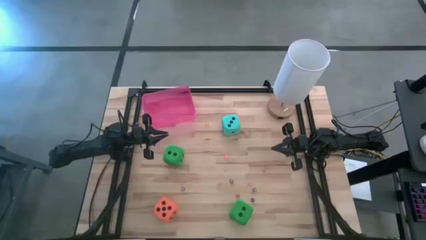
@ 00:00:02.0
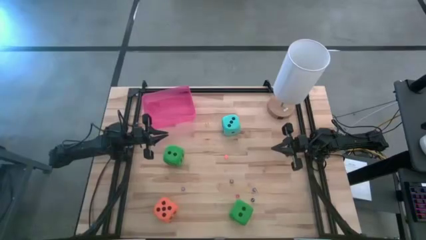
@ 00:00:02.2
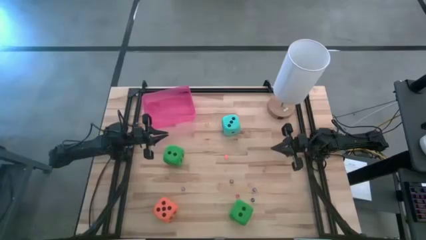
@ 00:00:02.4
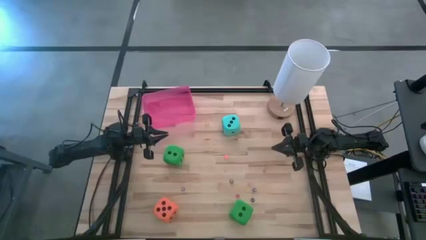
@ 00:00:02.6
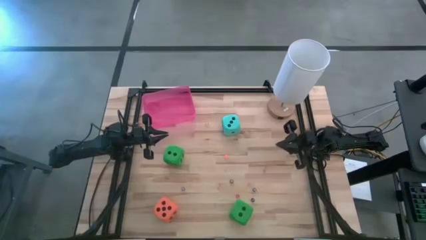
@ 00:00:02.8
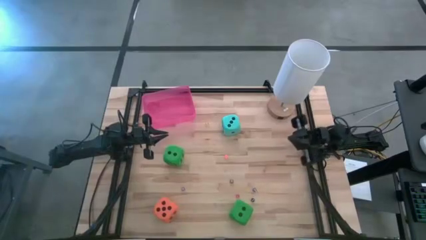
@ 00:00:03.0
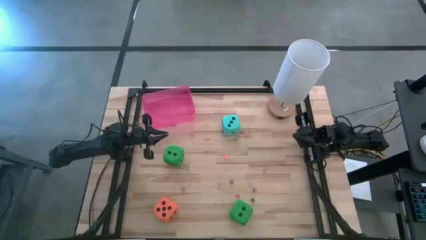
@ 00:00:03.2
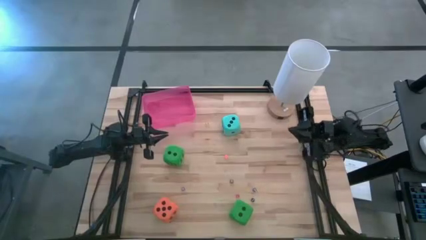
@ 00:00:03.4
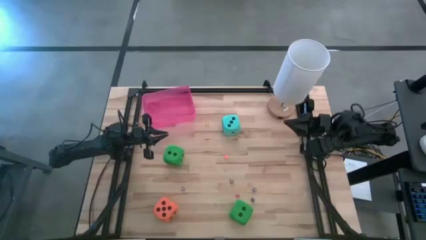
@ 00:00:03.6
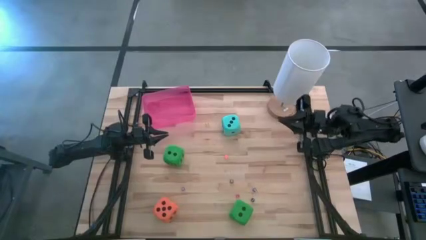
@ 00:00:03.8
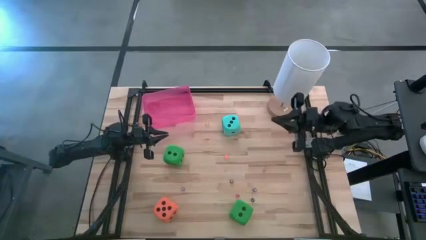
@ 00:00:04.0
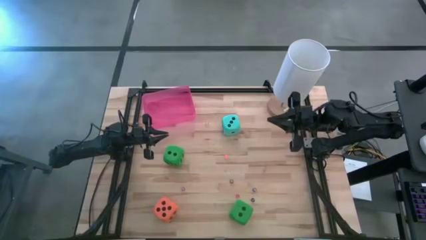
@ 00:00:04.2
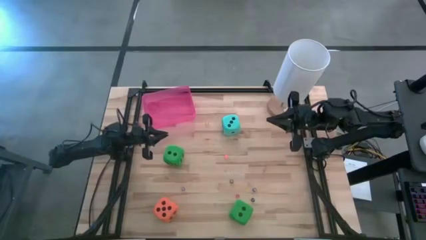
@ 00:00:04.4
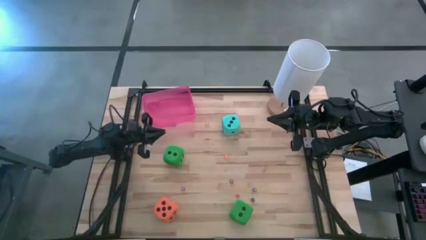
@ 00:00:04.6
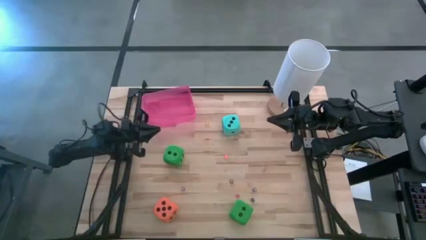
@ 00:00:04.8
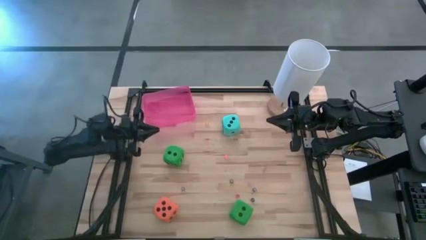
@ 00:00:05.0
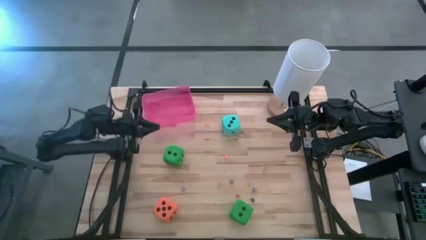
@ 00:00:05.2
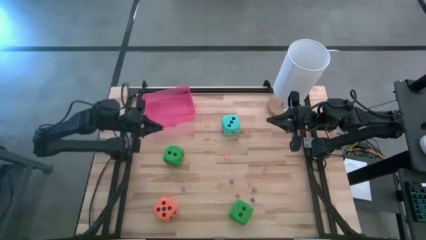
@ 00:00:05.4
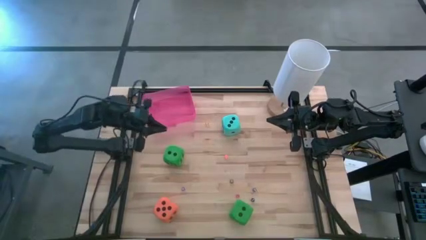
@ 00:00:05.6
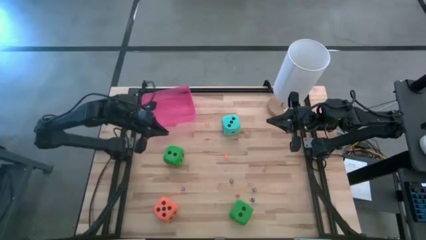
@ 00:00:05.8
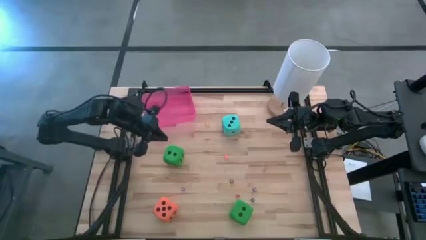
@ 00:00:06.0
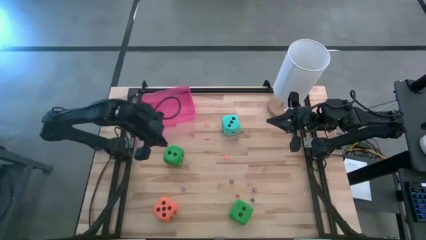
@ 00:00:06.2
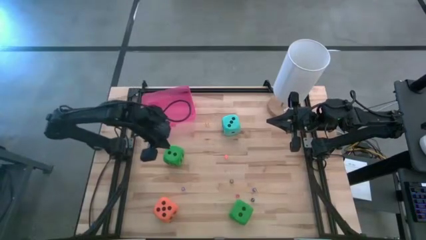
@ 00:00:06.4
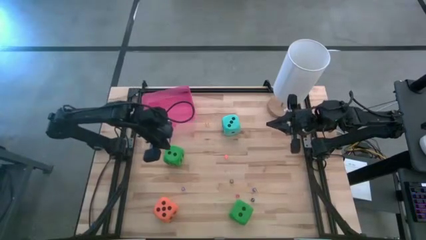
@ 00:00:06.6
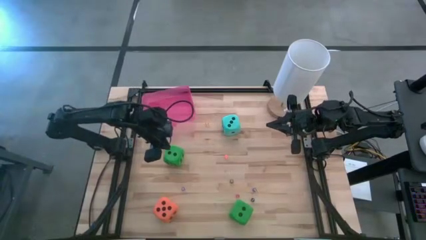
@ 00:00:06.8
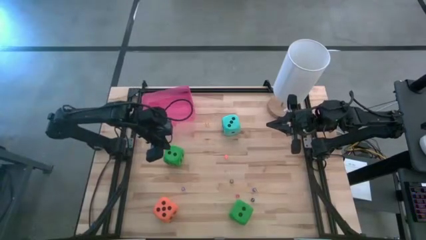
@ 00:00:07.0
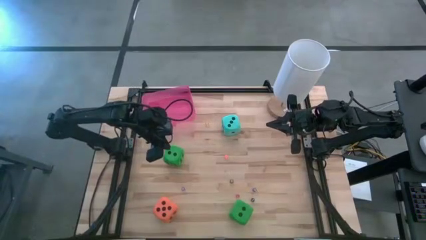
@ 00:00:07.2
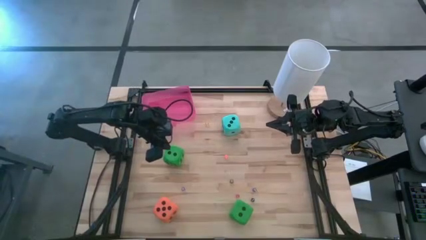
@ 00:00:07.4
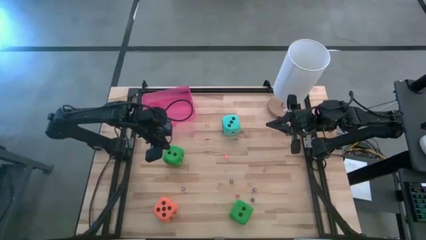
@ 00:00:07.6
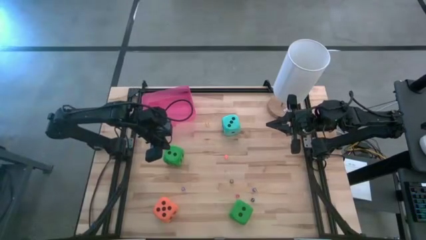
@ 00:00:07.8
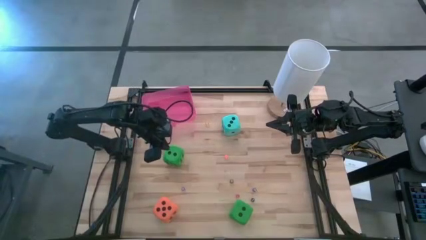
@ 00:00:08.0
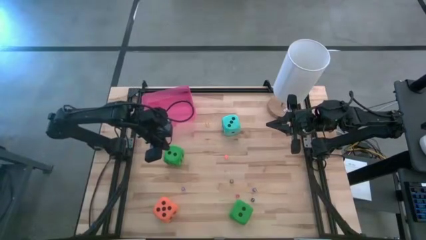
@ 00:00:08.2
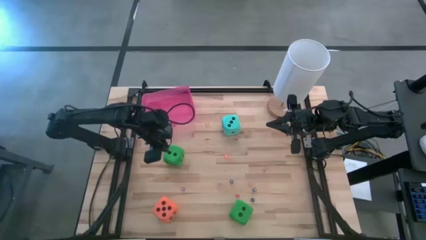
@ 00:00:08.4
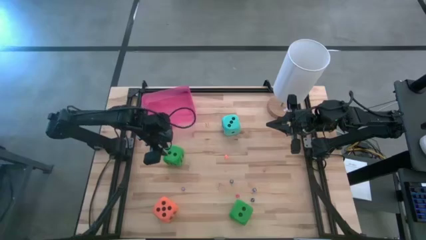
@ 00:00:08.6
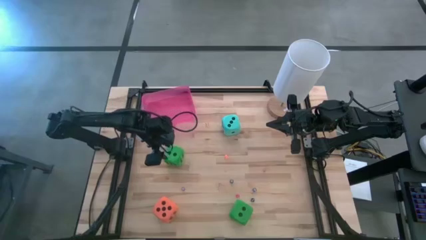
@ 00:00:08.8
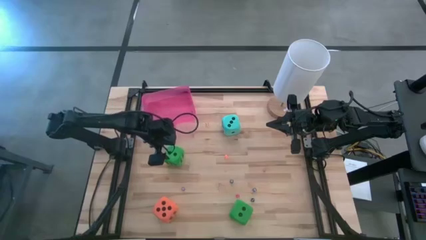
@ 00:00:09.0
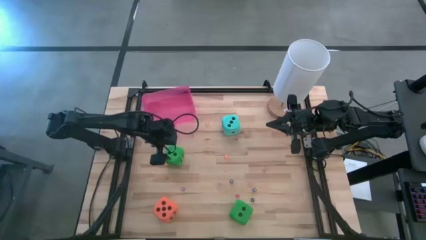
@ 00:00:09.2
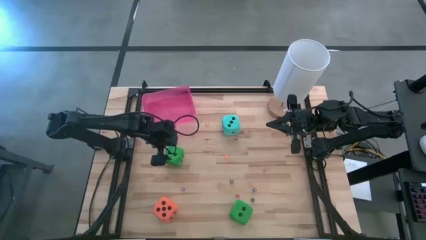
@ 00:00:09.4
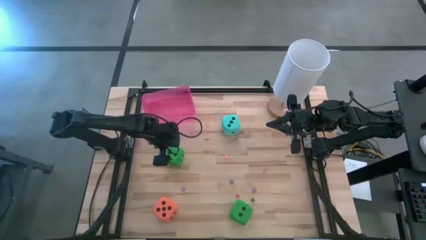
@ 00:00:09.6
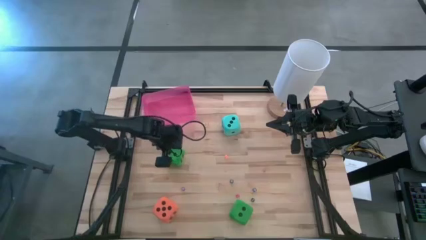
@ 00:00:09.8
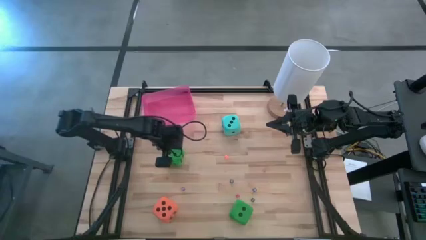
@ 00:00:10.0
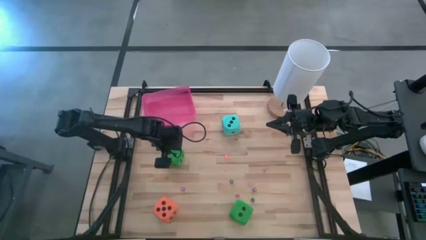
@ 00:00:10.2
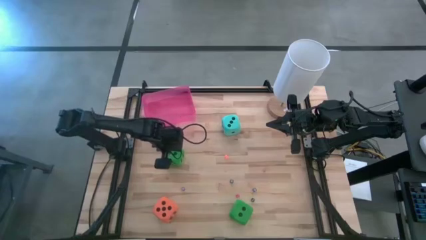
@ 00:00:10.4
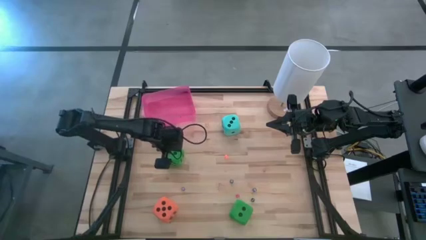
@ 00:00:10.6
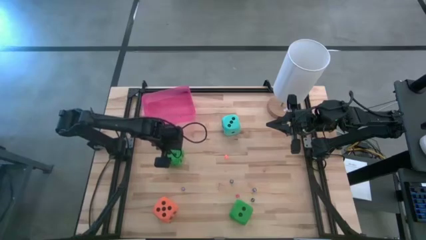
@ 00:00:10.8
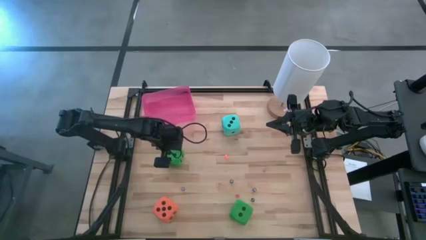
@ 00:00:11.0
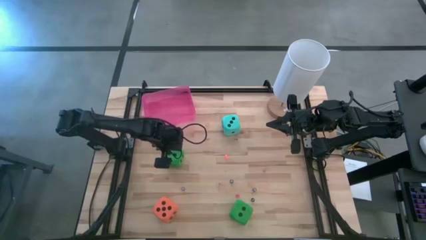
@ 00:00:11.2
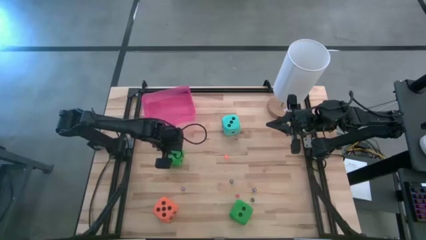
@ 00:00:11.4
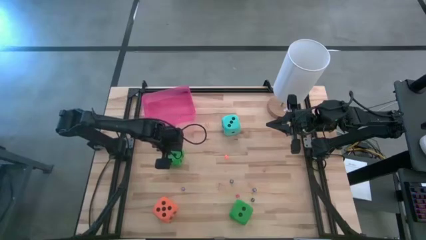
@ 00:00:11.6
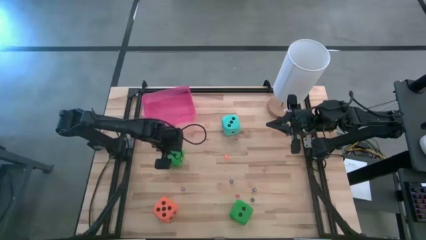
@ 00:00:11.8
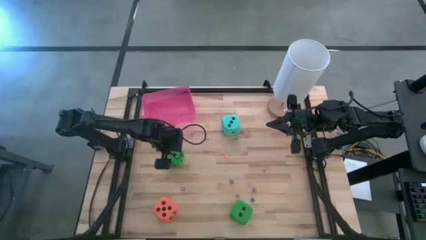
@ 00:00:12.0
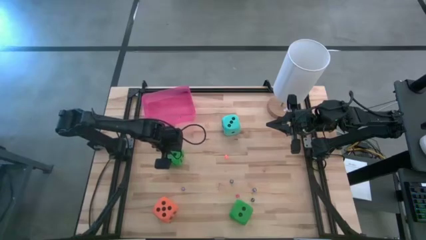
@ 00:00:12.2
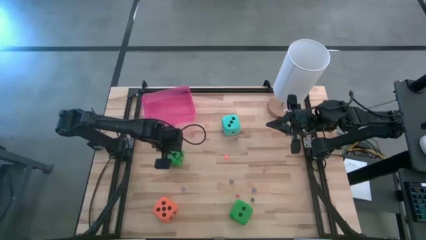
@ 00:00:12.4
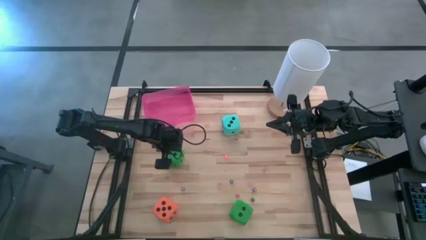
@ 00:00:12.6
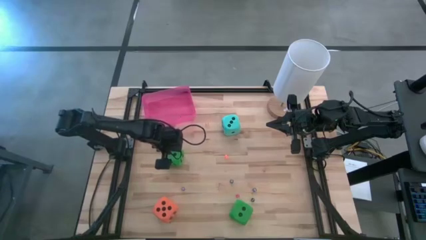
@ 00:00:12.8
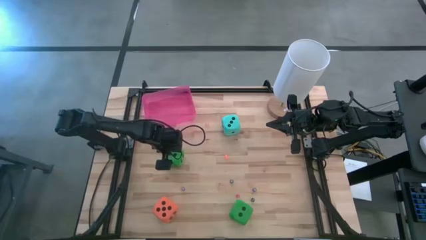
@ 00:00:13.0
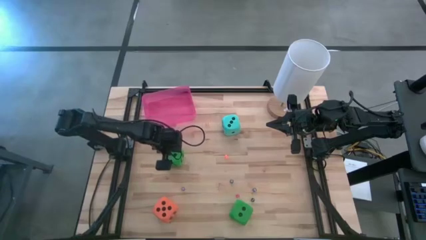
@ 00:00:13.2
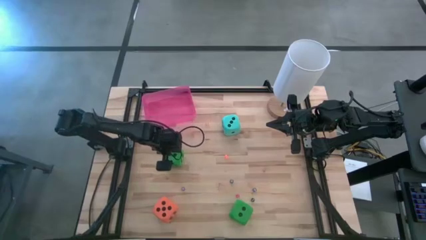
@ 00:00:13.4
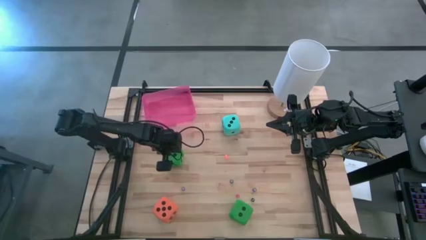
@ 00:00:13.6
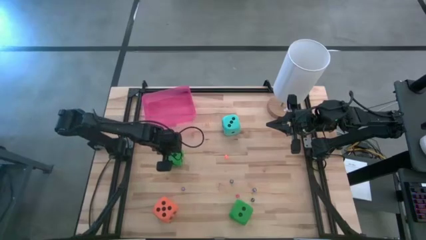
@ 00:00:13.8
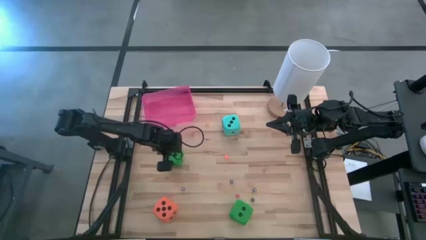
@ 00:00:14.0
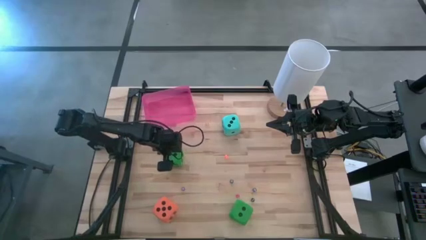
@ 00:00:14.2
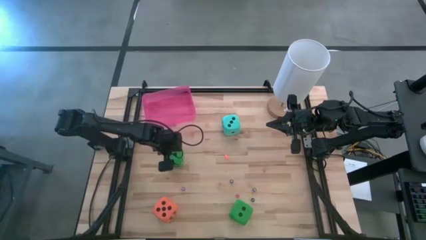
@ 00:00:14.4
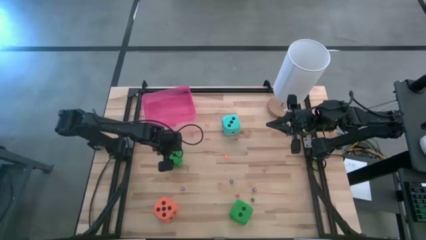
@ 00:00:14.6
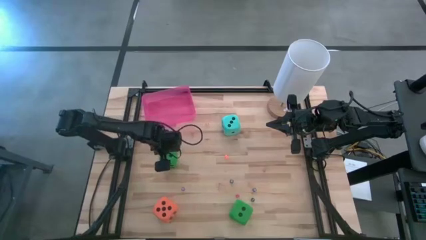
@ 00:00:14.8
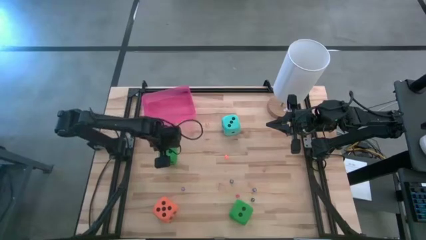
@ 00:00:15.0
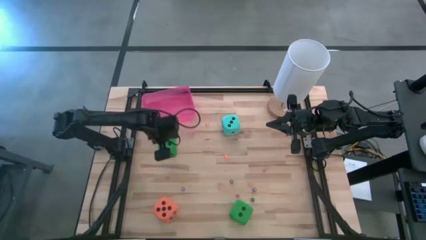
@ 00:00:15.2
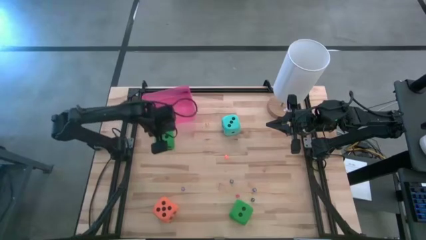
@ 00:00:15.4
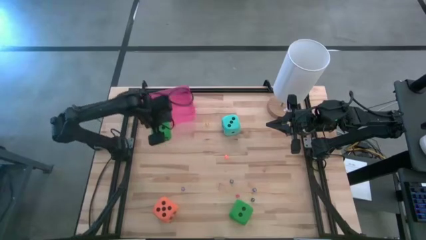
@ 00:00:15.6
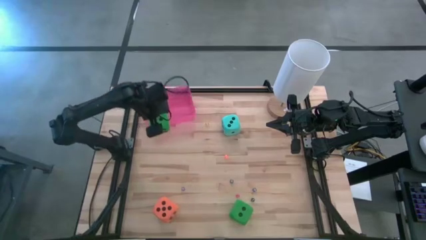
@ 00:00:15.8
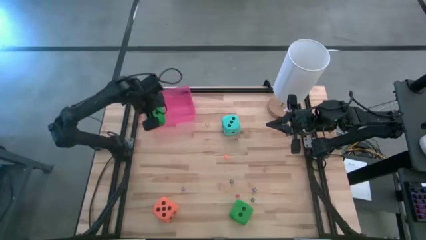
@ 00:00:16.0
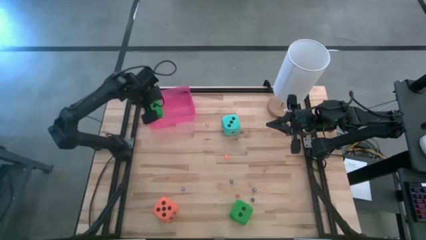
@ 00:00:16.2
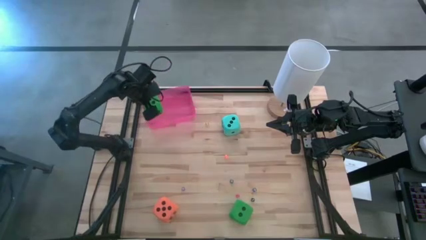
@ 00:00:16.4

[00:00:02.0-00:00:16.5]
Task: Pick & Place Dice
Put the top big green dice into the red bin
